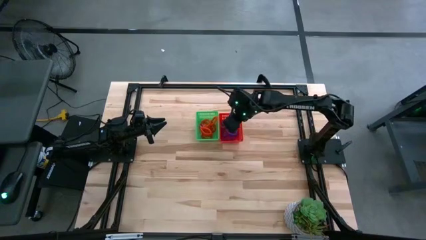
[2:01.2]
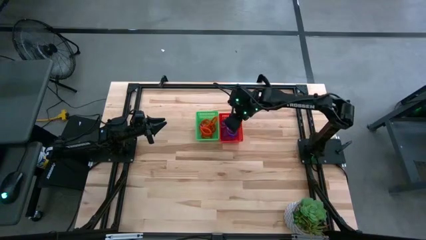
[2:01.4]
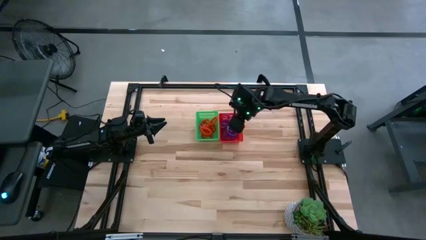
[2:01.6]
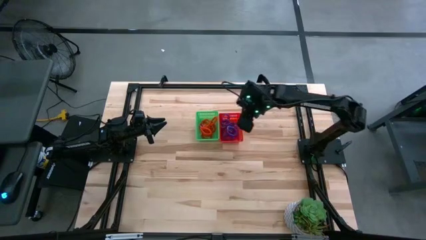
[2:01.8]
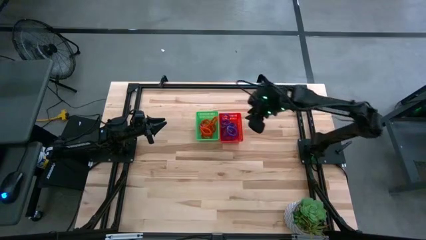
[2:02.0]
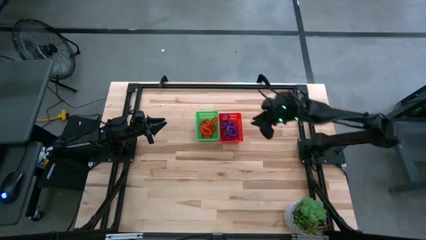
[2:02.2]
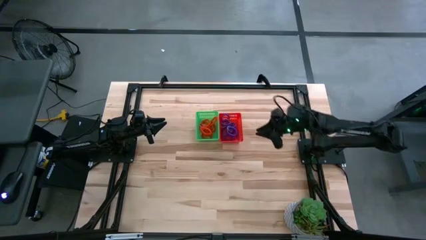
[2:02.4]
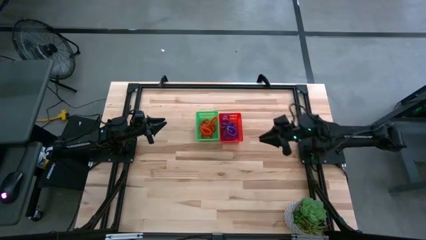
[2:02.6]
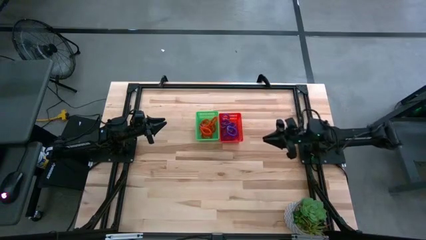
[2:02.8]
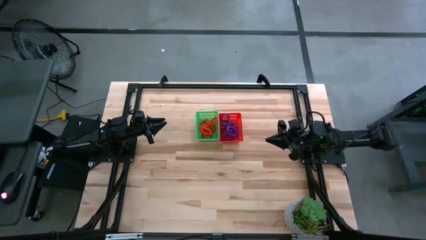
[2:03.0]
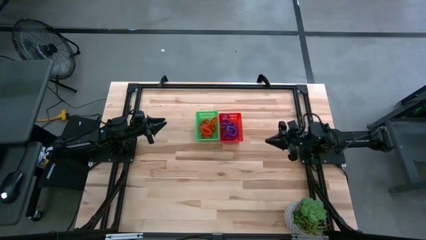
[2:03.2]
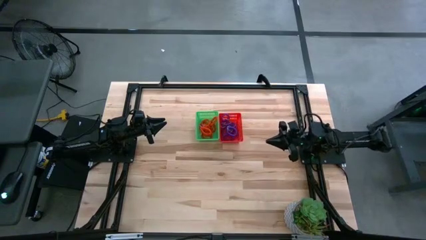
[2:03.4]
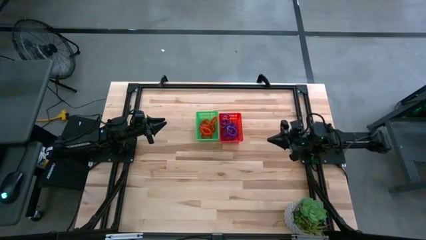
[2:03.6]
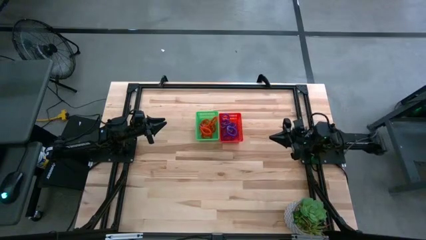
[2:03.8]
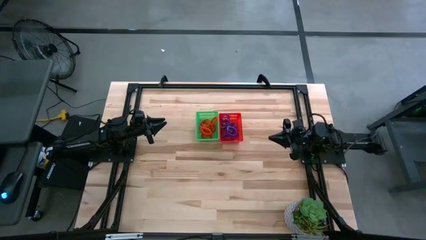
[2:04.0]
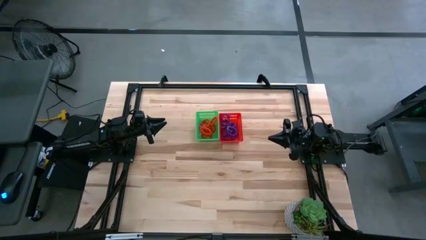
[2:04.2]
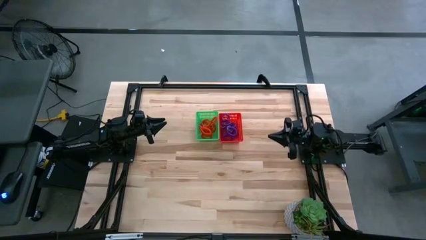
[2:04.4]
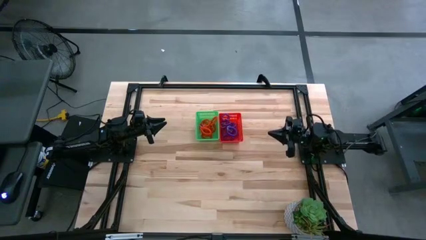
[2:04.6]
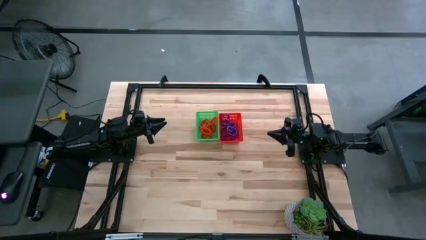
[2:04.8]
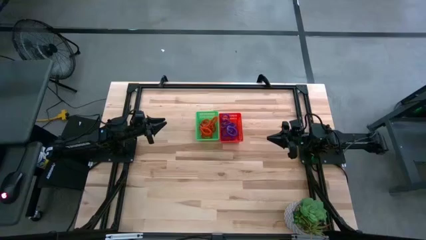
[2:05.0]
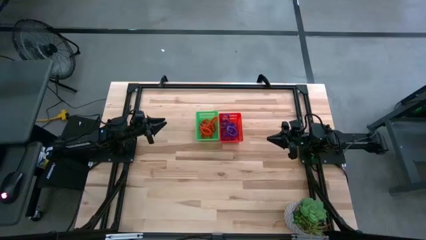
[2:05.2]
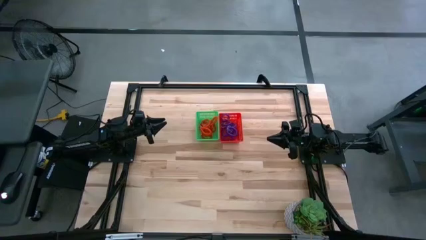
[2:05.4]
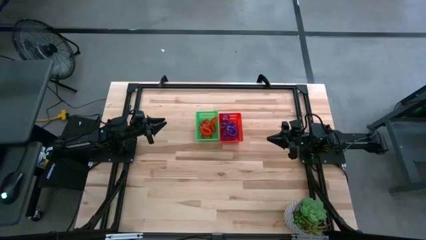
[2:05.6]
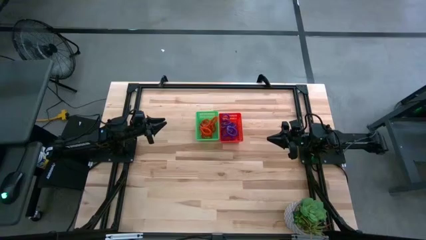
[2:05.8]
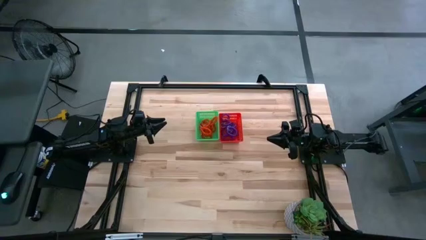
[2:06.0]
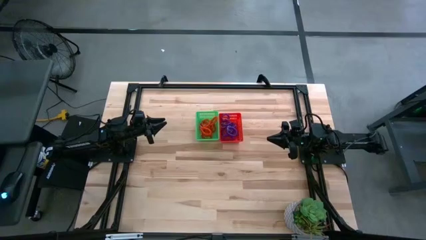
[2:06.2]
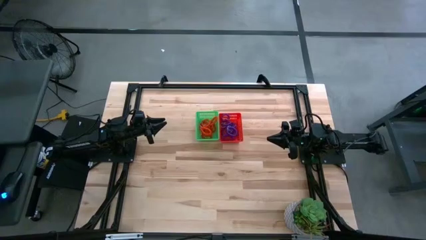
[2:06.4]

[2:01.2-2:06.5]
Task: Sort spring keychains
Return to Home Position

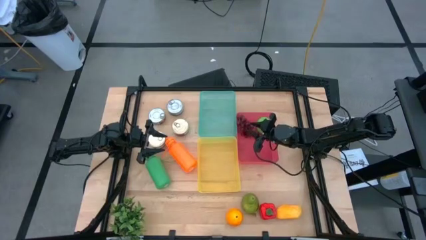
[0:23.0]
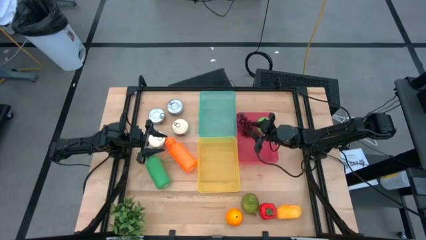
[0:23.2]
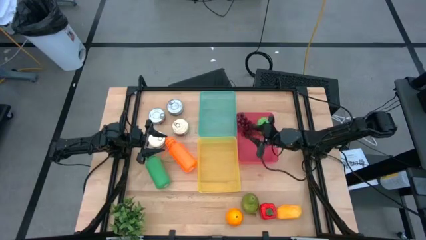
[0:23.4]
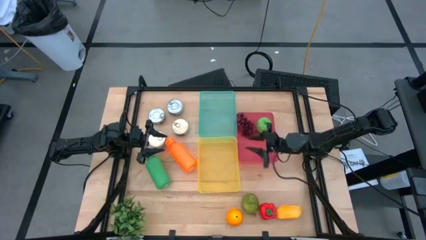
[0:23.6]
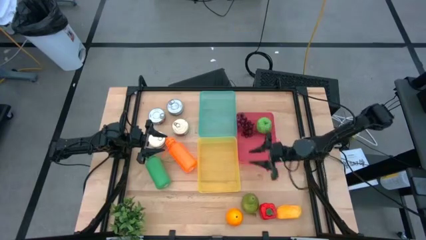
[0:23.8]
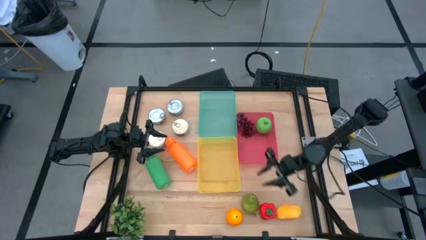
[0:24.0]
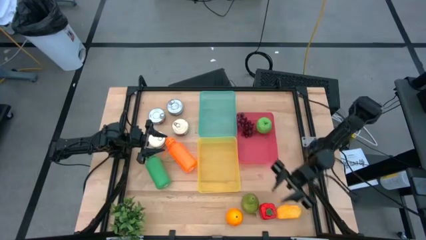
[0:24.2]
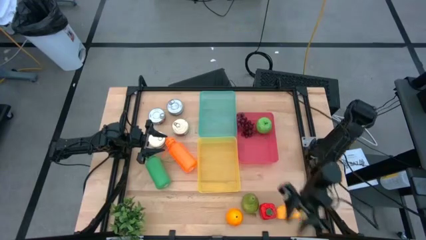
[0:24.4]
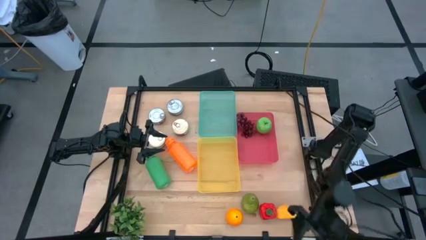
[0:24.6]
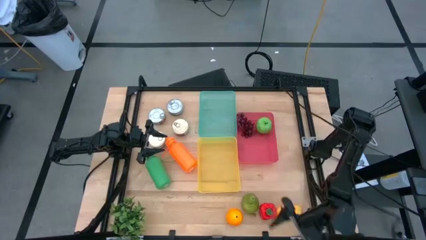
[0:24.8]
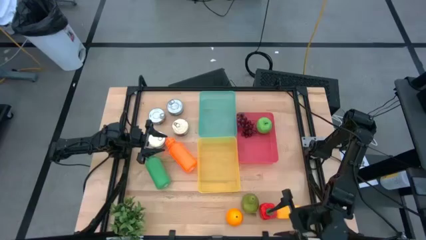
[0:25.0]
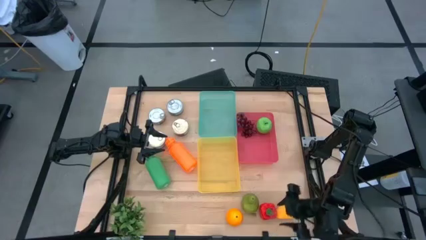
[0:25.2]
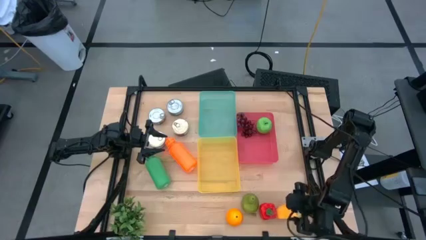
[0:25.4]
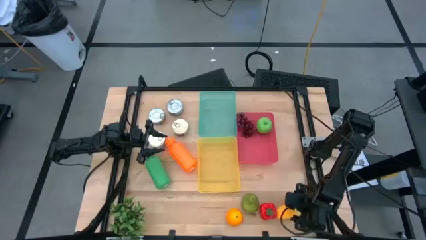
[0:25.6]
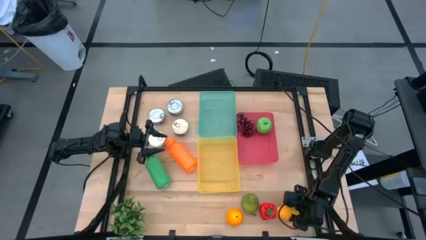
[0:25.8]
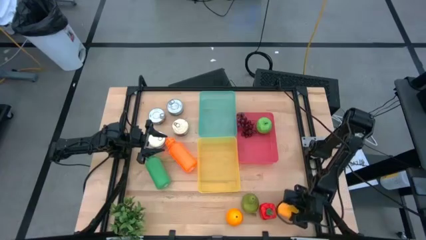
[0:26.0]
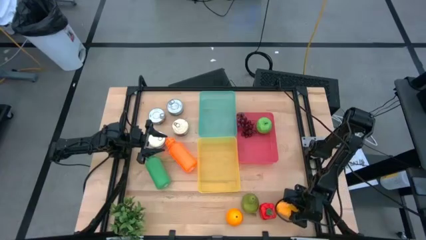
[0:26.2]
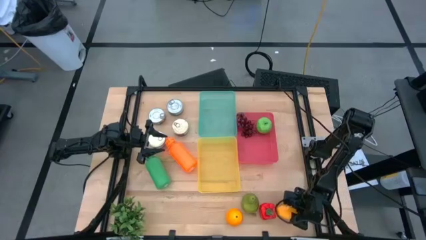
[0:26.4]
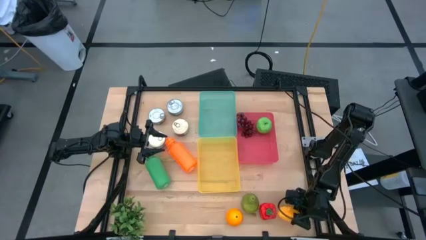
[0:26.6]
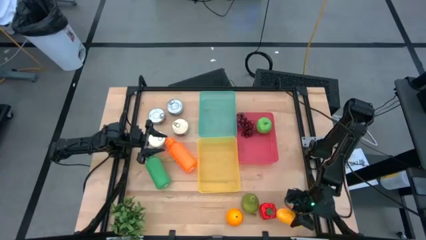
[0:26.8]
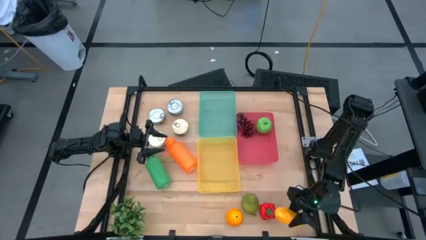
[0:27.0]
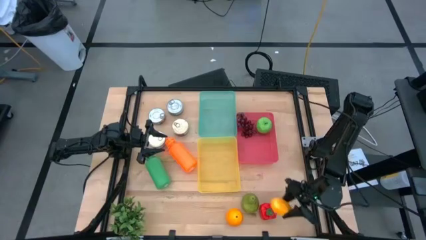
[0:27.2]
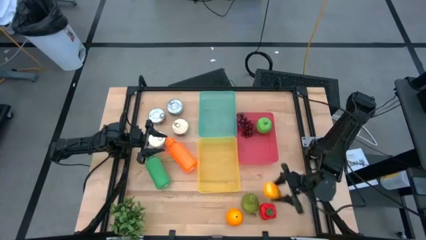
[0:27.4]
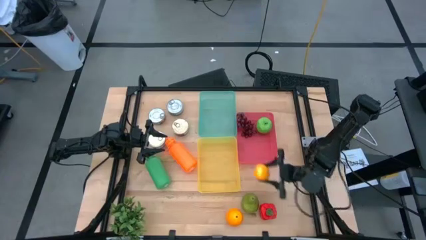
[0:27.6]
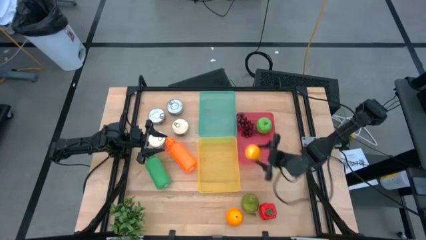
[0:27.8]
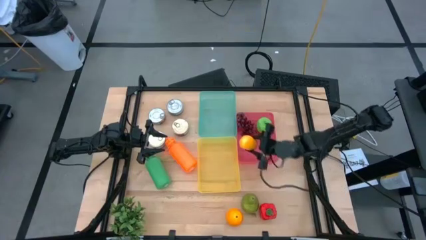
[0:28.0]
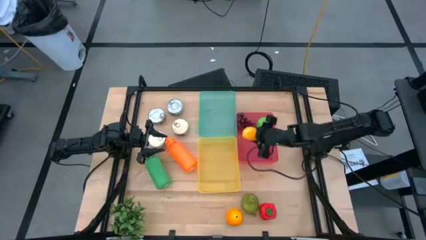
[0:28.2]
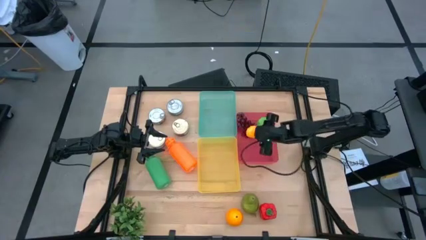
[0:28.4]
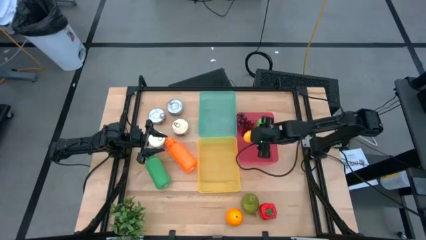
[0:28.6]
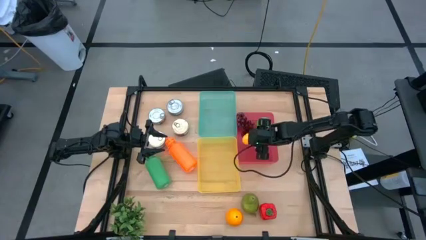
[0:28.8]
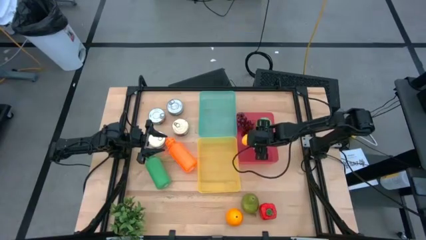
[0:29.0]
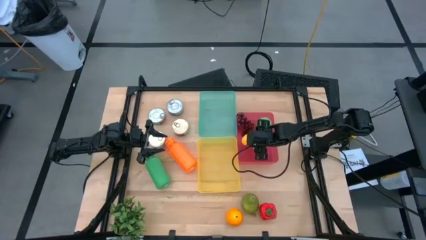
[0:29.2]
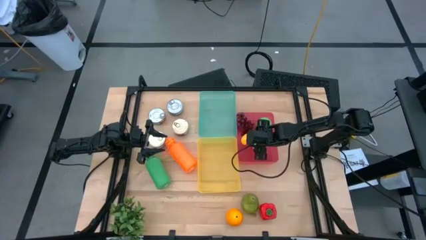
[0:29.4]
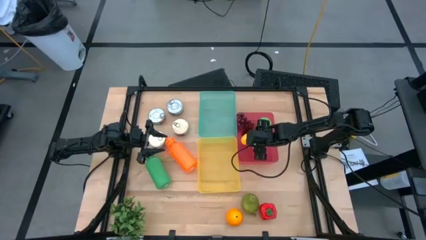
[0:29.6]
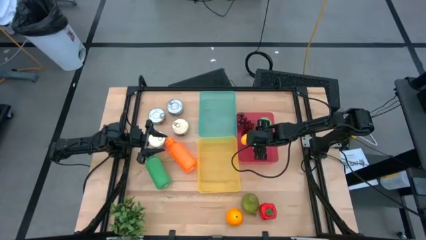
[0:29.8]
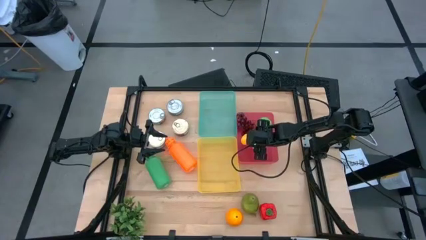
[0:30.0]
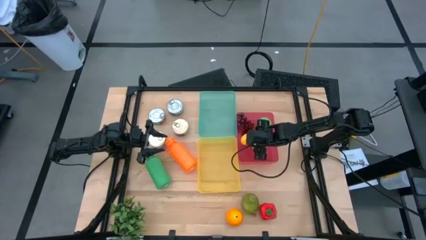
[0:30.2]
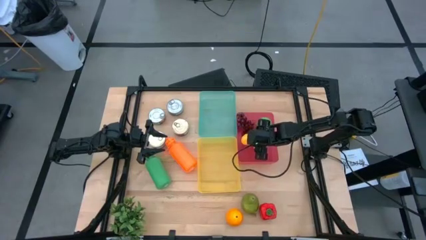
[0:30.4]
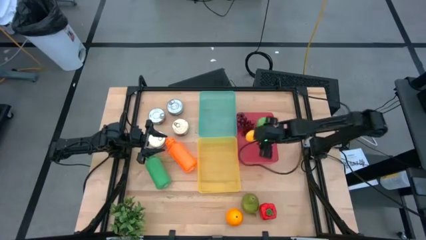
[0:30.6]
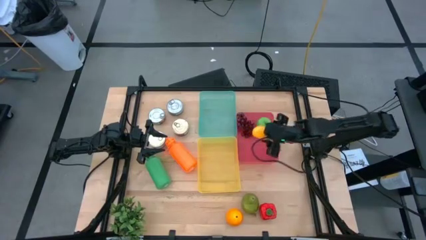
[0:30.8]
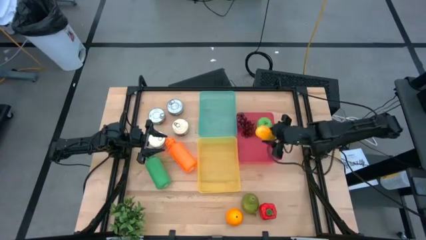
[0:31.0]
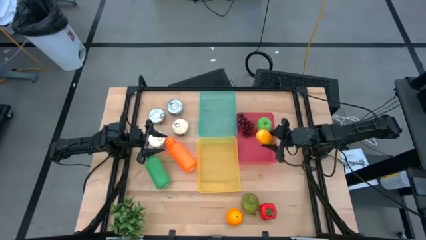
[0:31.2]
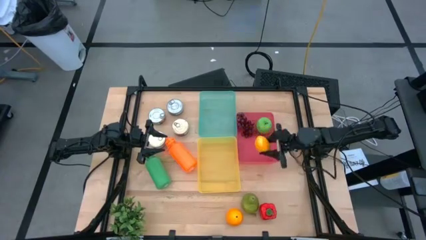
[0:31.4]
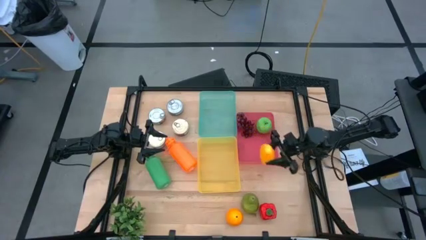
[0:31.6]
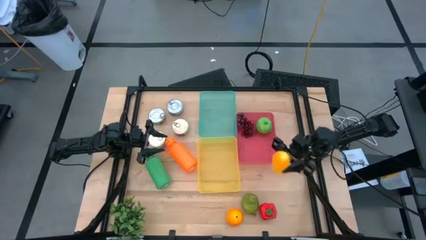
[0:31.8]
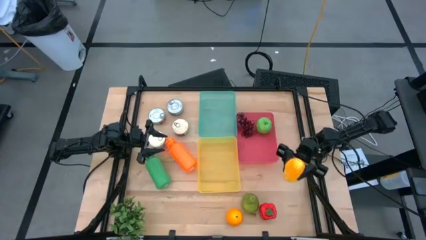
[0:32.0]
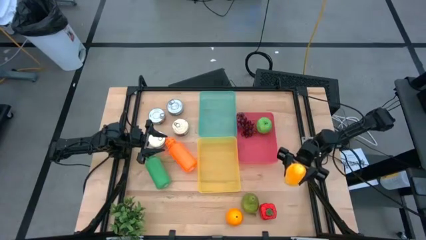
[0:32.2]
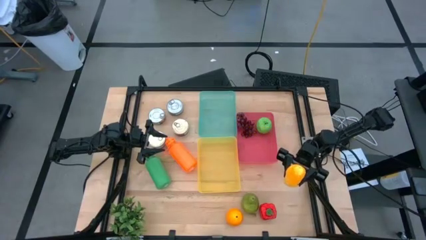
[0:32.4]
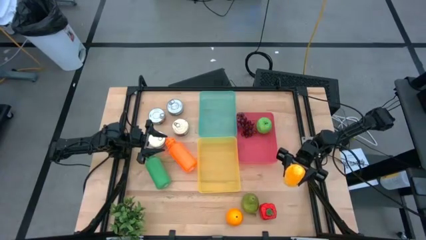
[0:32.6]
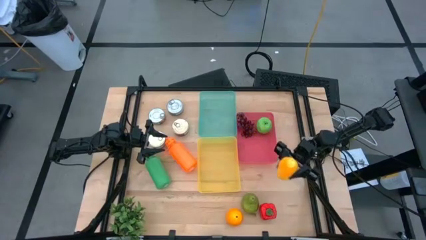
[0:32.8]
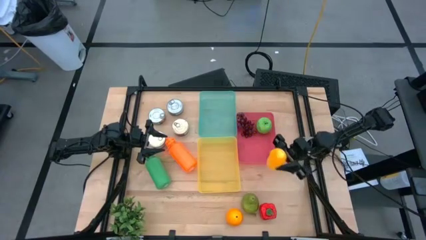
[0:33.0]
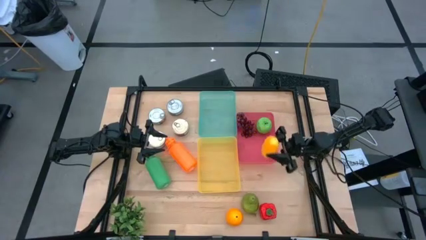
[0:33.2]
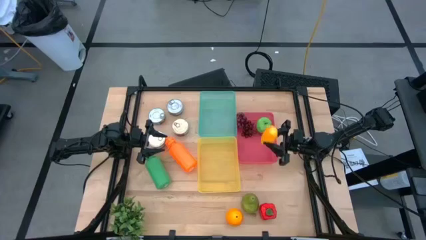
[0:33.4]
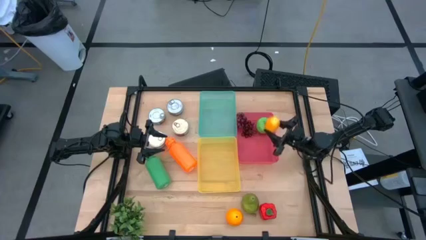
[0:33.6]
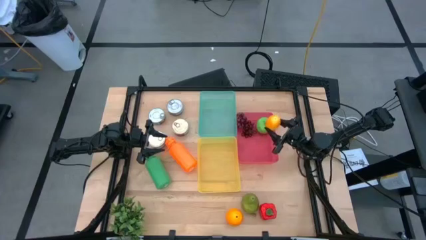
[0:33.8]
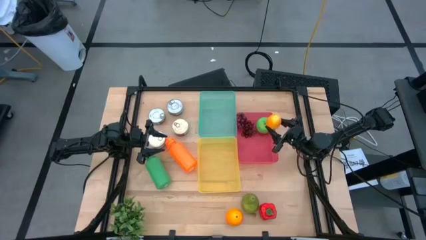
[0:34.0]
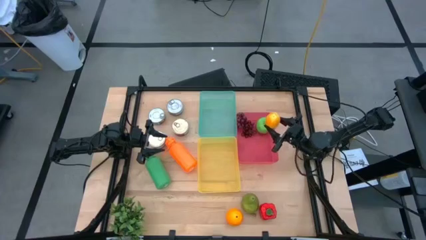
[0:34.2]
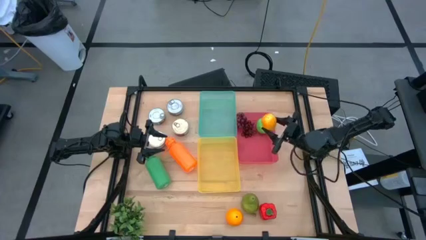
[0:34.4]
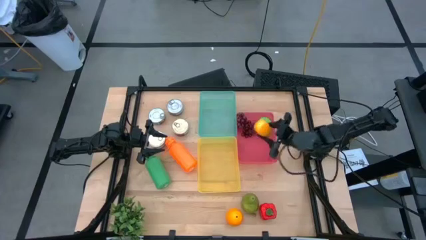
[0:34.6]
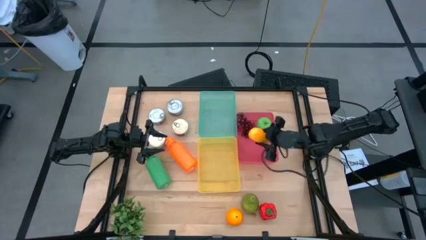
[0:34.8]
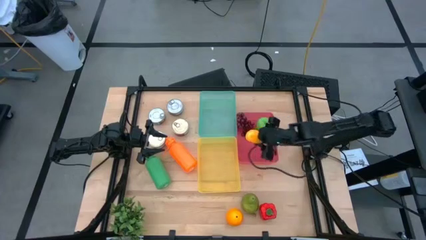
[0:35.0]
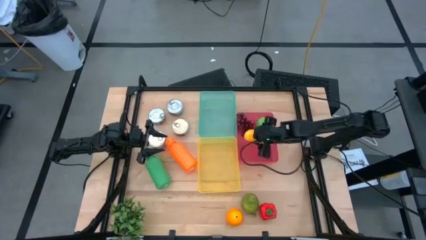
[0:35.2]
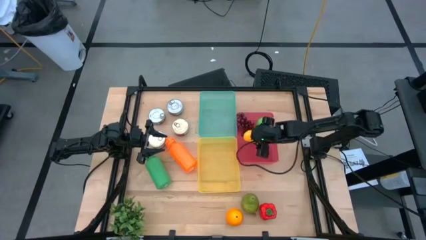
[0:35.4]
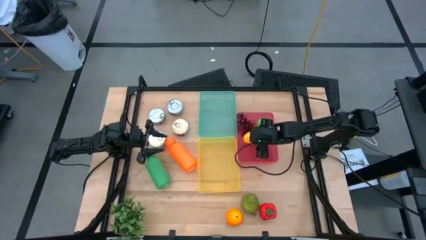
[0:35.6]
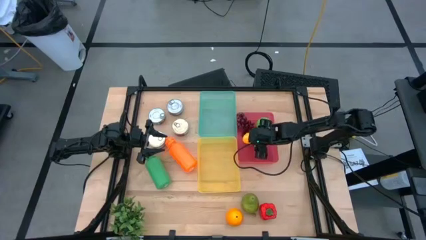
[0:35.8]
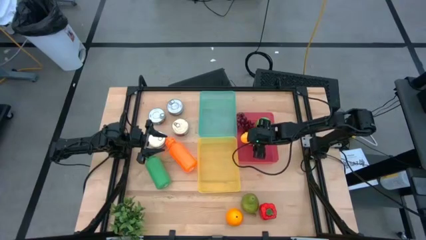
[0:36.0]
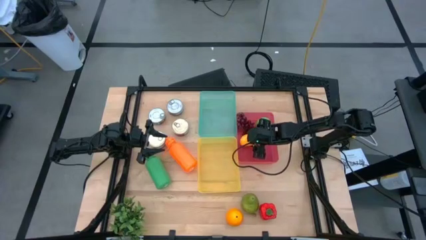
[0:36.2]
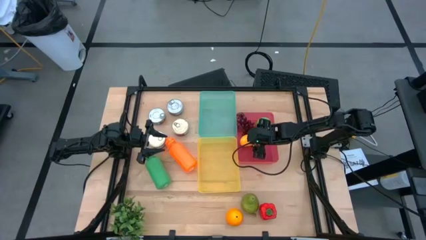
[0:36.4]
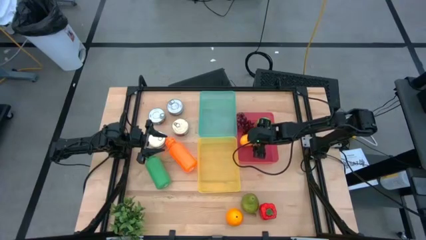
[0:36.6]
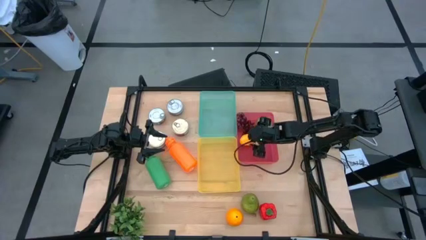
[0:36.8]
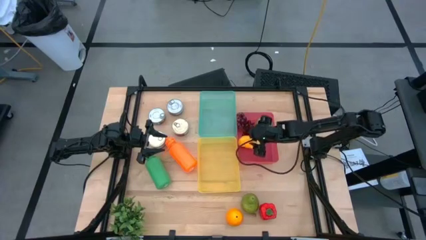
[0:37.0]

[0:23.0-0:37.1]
Task: Pick & Place Food Item
Put the yellow mango into the red bin
